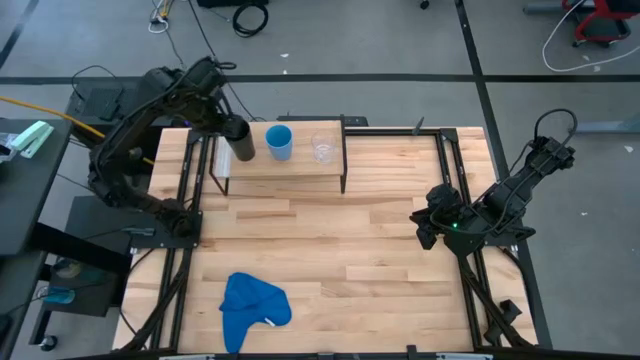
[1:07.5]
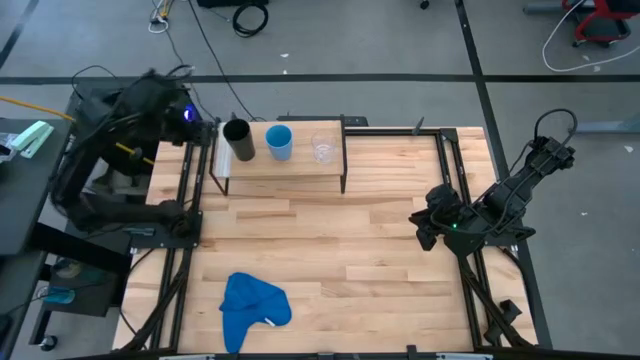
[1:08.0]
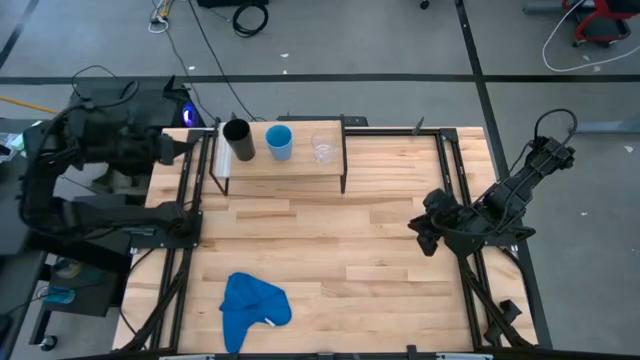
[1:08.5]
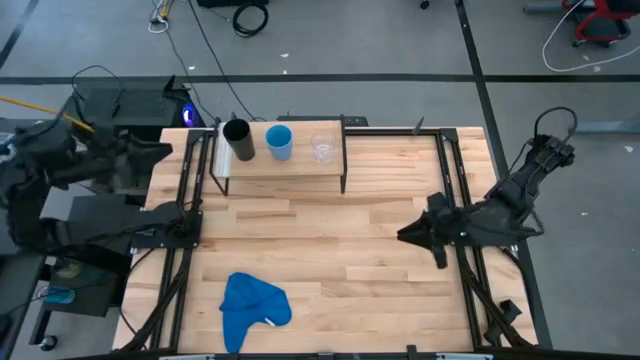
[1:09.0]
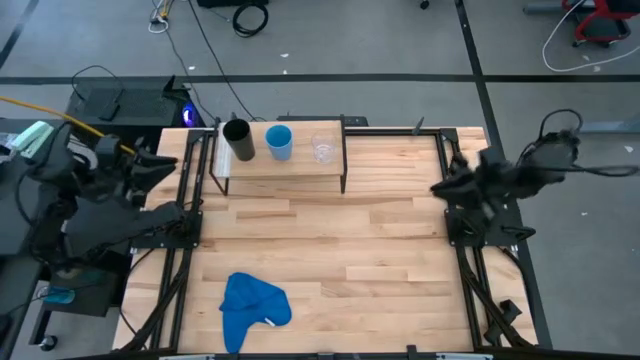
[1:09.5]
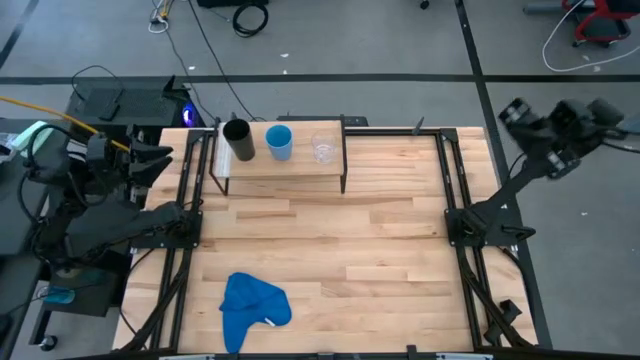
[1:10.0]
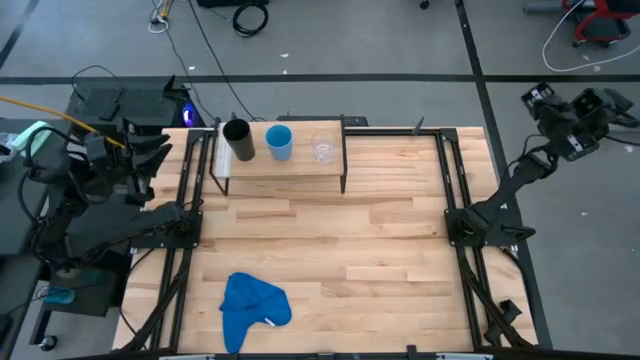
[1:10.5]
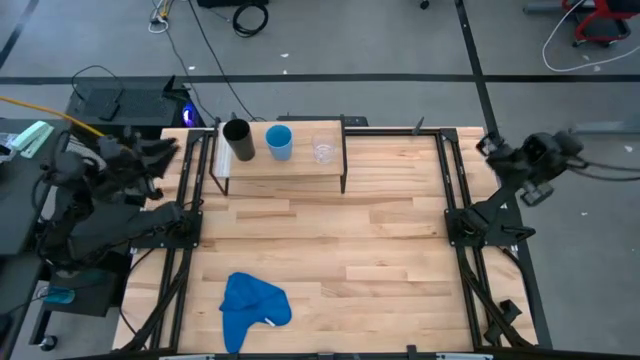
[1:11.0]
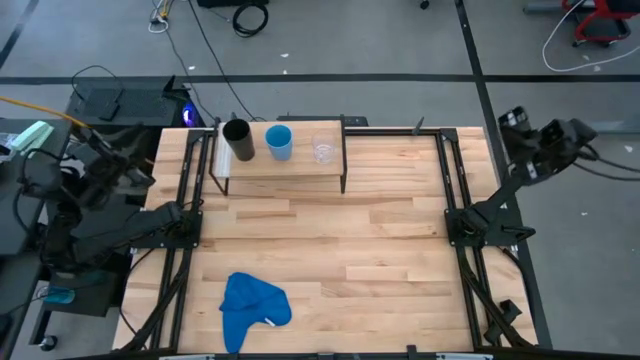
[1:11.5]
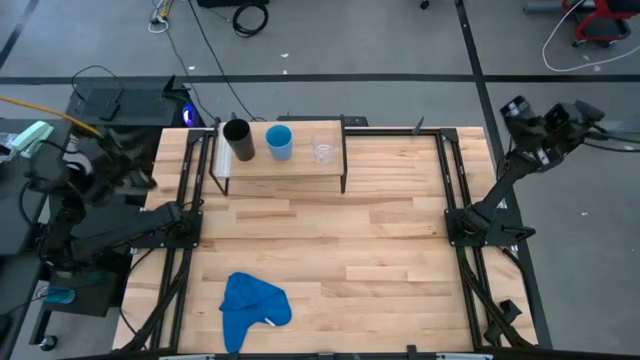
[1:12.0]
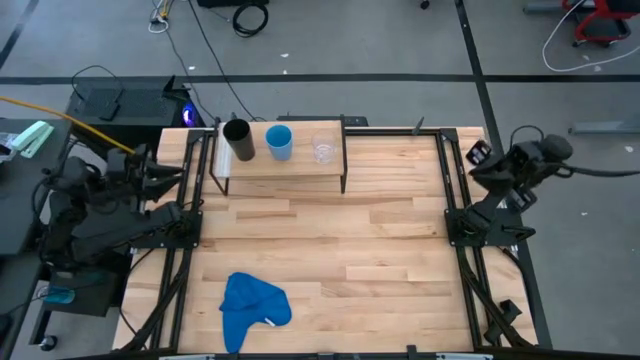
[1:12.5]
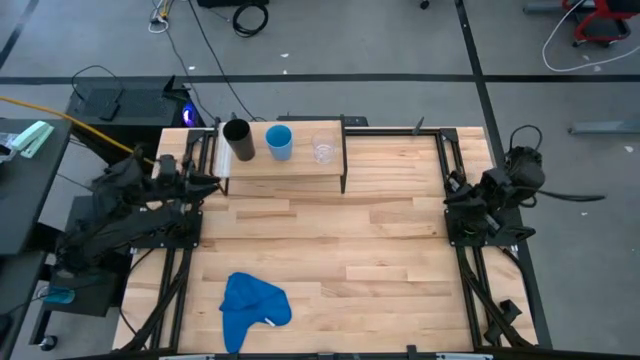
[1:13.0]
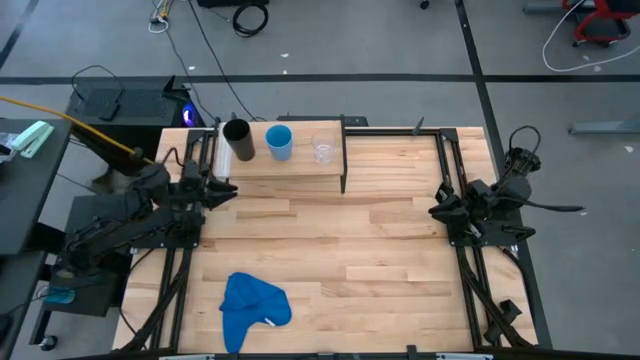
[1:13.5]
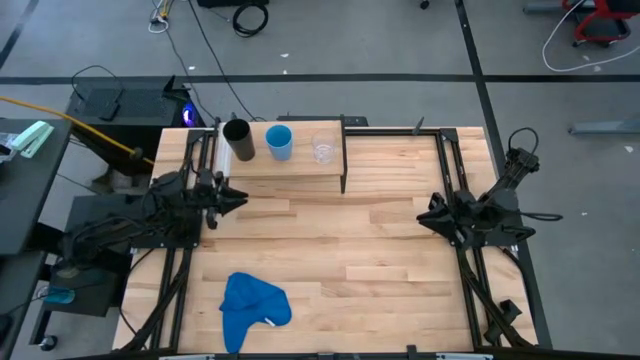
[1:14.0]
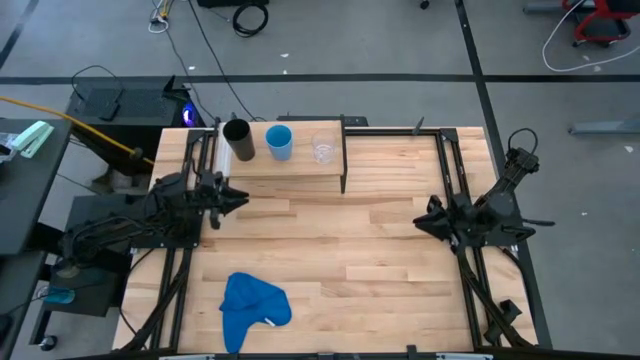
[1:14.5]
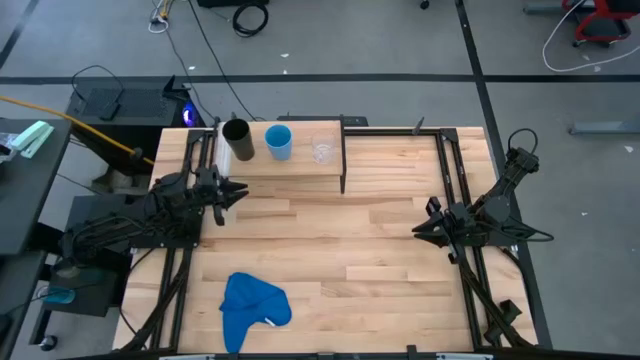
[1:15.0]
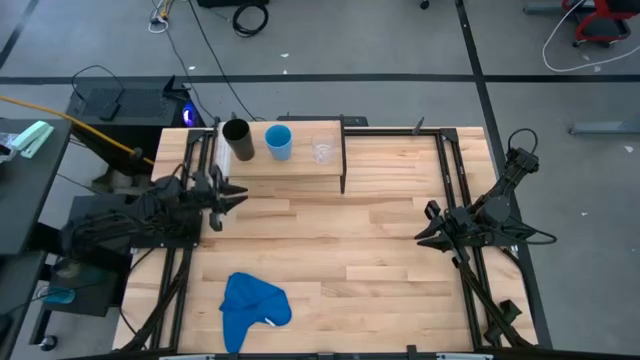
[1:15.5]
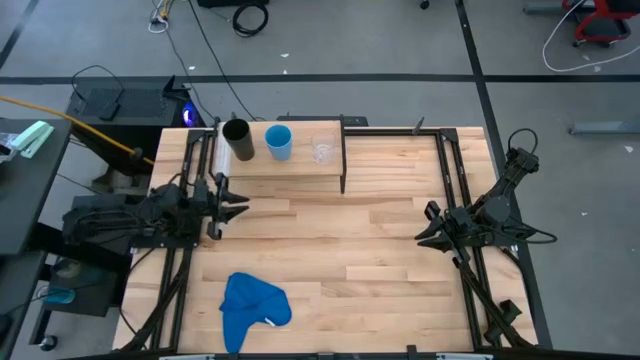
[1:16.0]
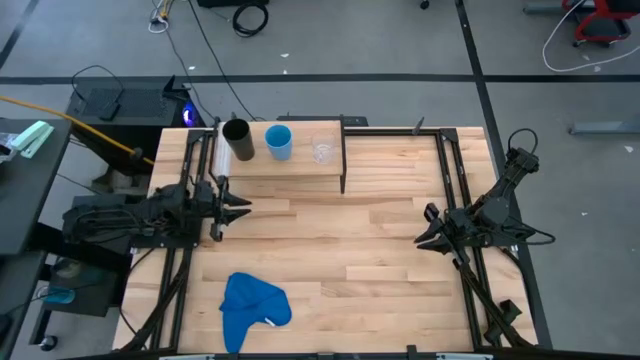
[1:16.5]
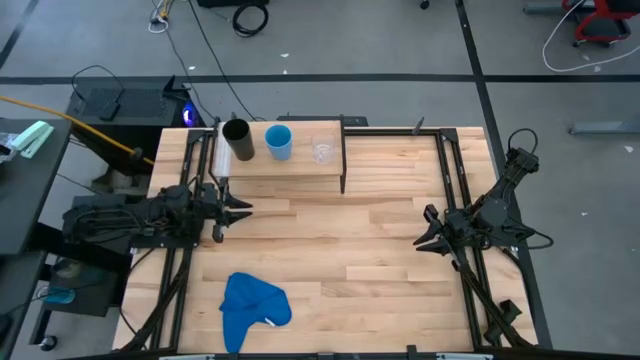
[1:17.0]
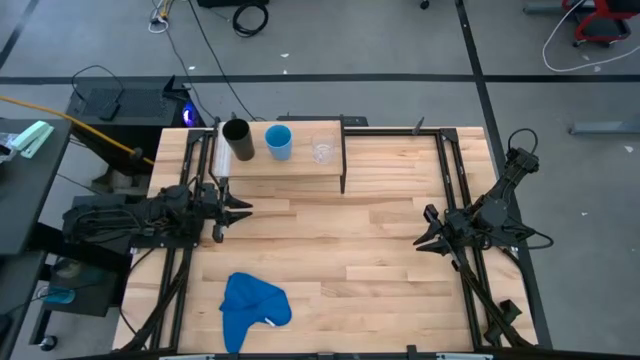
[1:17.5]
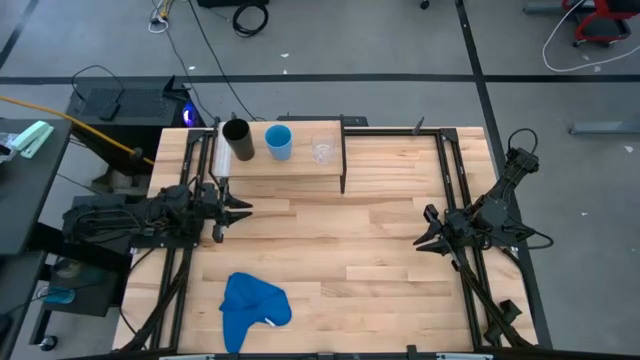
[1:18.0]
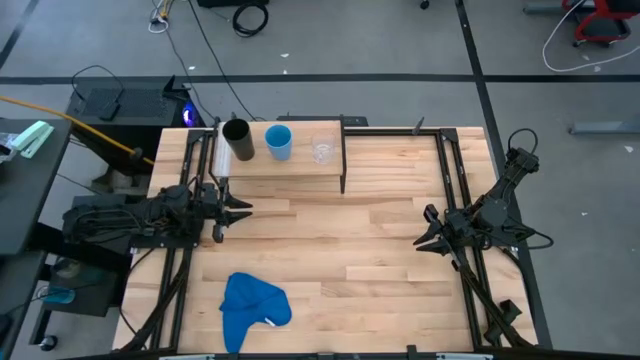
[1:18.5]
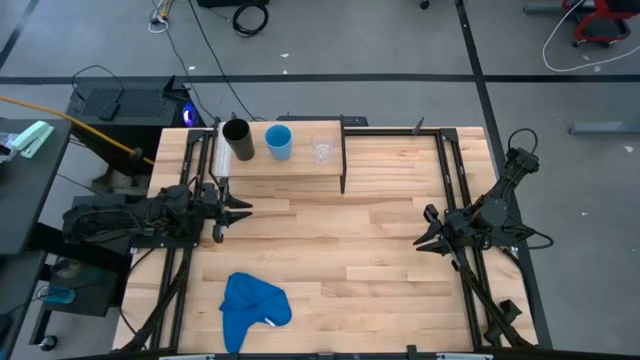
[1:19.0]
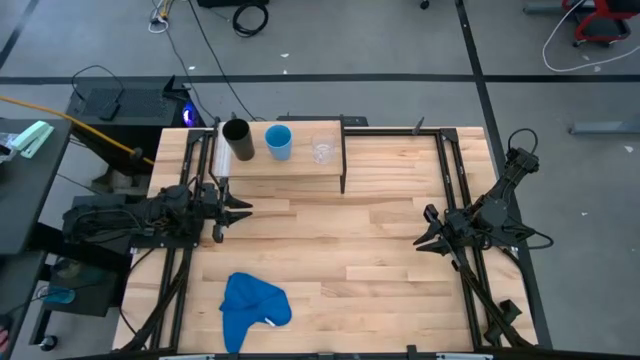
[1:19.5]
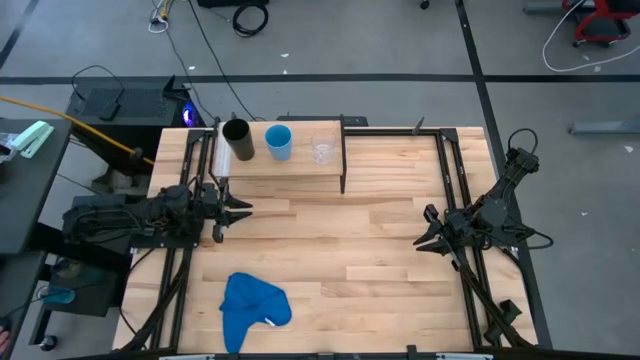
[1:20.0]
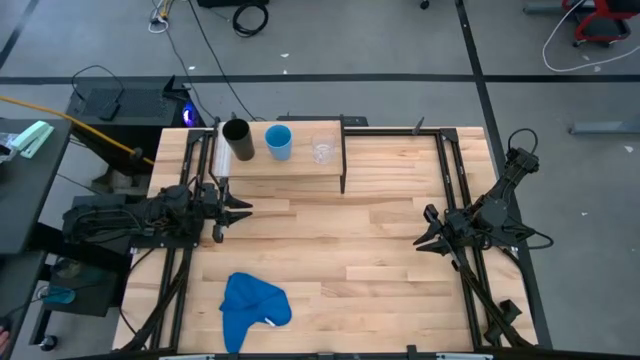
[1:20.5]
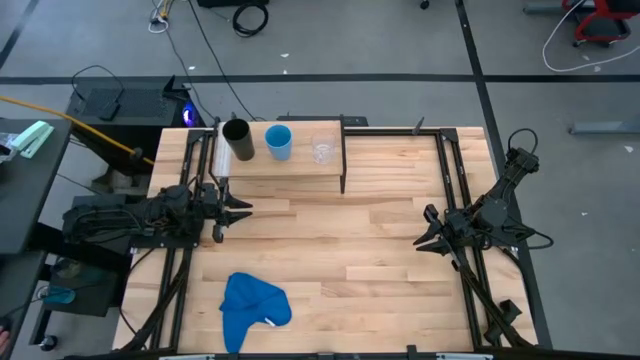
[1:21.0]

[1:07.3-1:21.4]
Task: Stack small to large cups/mugs on shelf
Return to Home Position

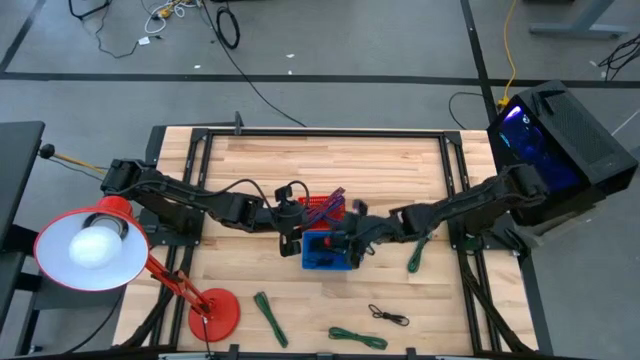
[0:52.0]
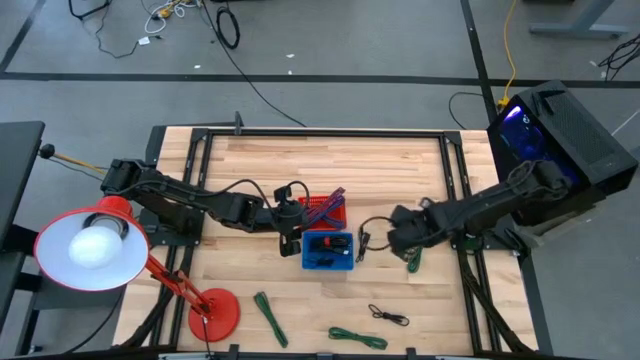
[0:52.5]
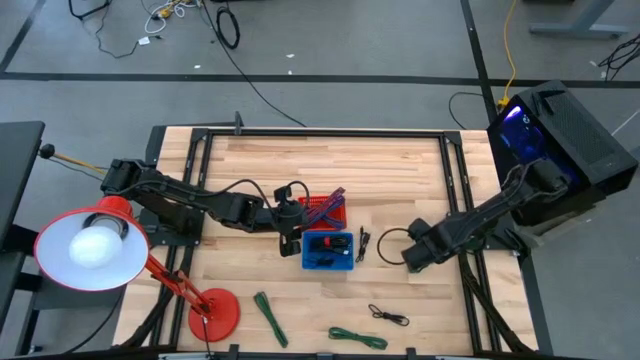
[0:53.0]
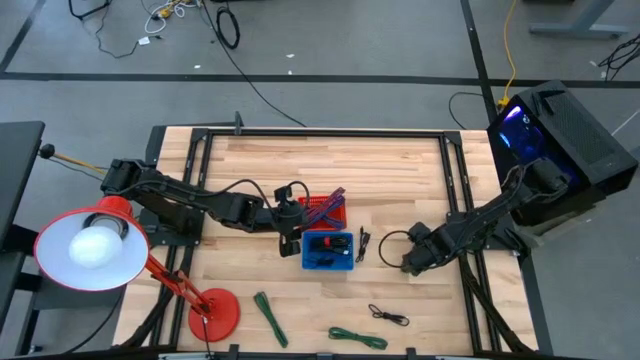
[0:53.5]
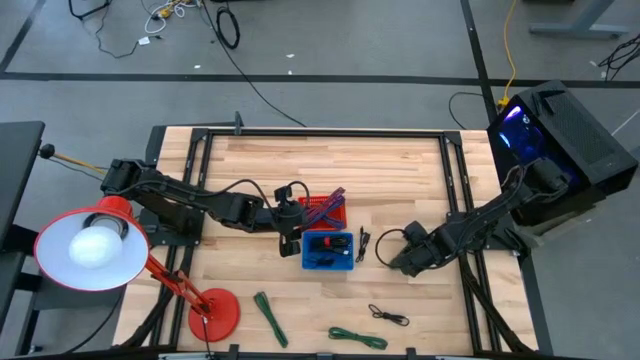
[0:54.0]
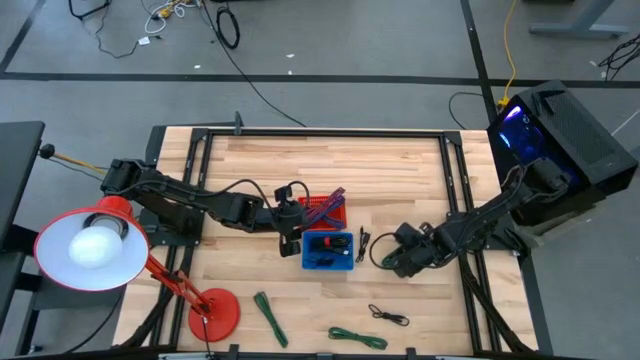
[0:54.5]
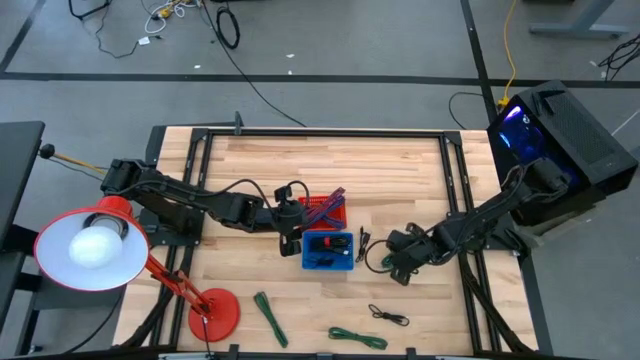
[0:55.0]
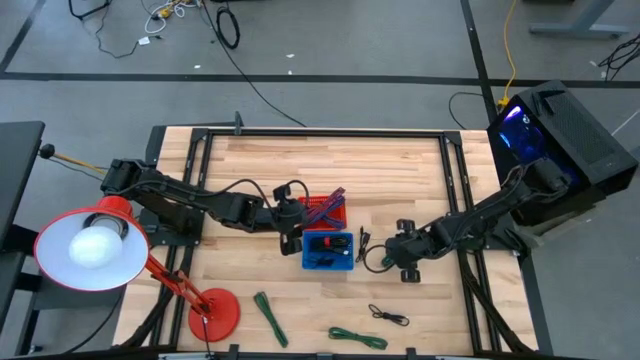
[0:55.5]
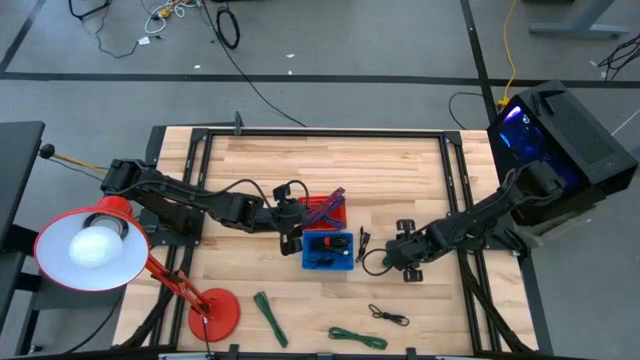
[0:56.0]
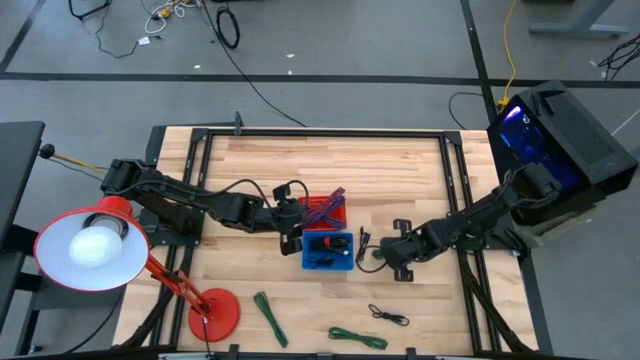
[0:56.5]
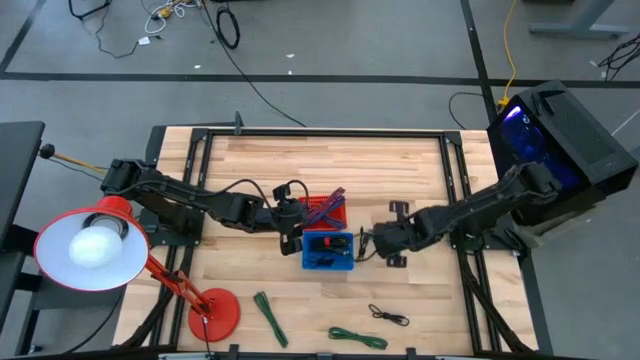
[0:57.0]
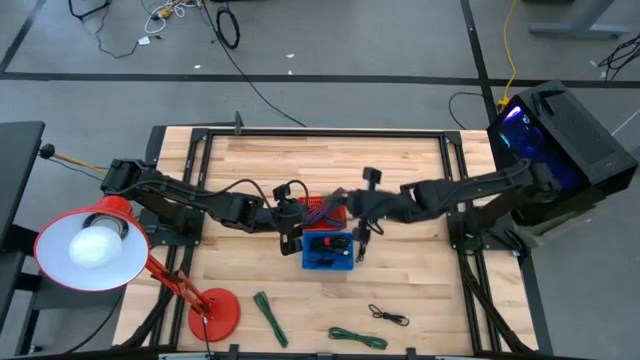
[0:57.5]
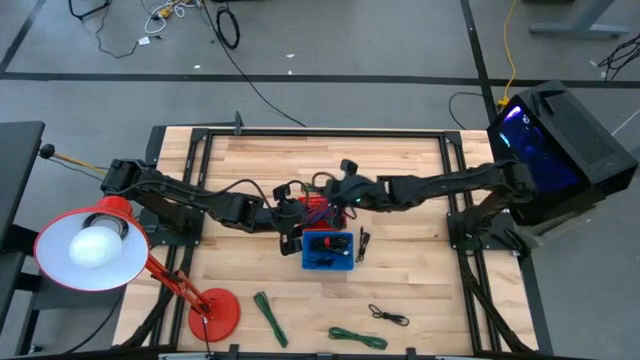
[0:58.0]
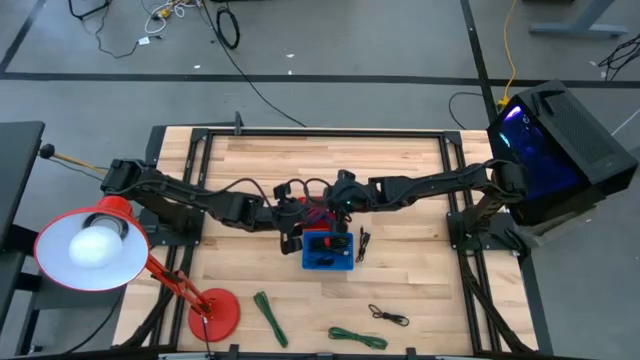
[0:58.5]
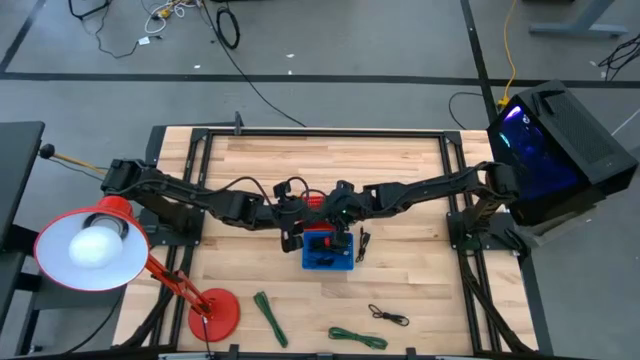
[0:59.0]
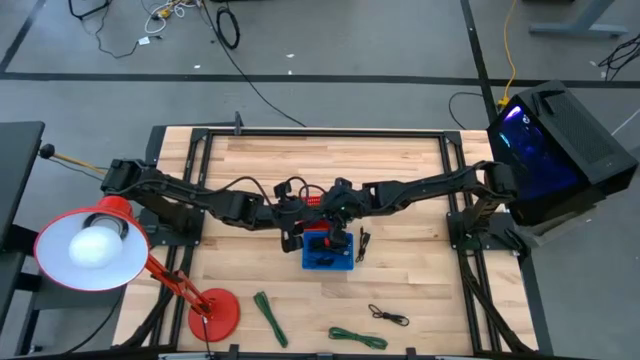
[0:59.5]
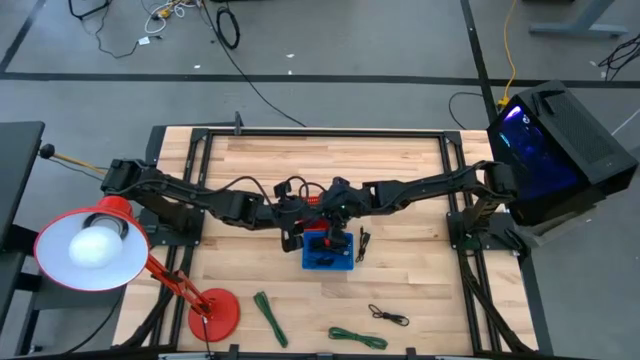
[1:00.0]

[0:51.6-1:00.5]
Task: Pick & Place USB Port
Put the green charger cable into the red bin
